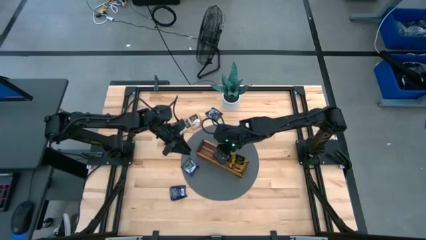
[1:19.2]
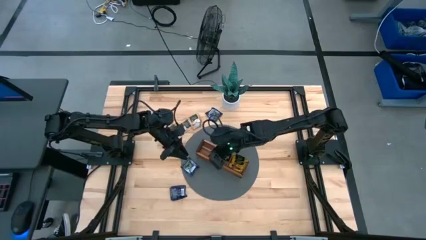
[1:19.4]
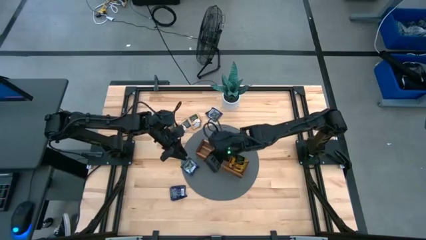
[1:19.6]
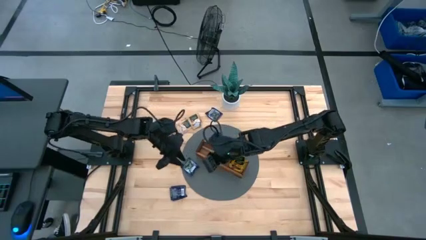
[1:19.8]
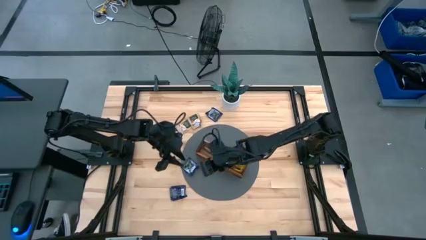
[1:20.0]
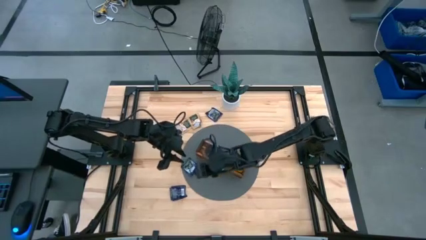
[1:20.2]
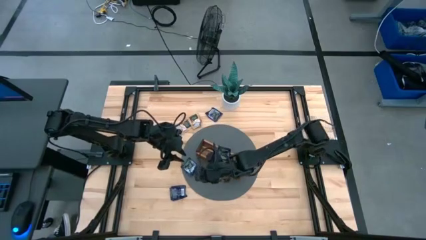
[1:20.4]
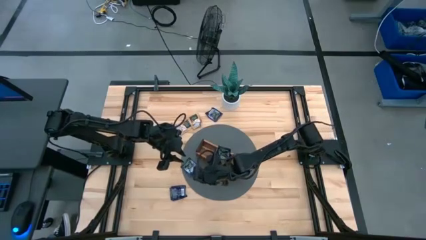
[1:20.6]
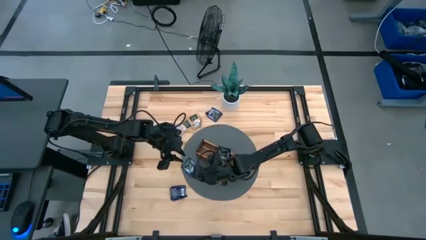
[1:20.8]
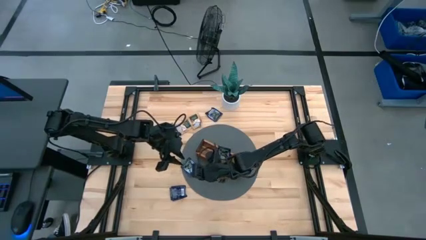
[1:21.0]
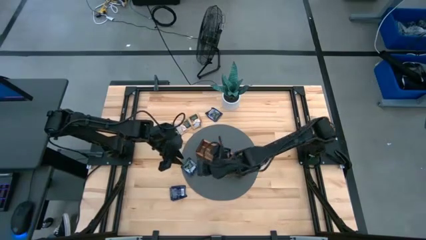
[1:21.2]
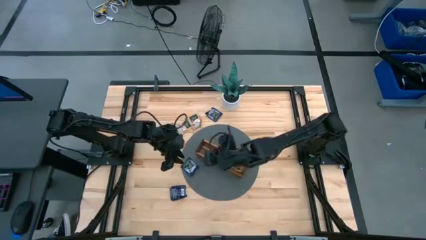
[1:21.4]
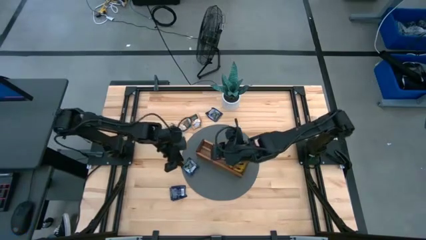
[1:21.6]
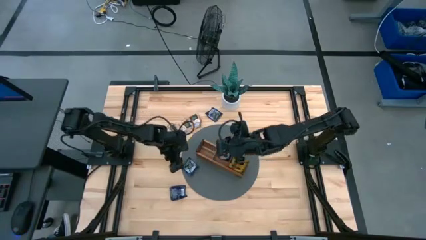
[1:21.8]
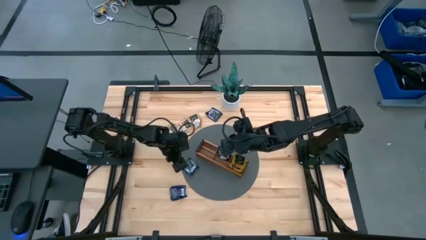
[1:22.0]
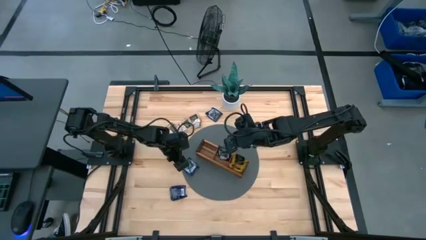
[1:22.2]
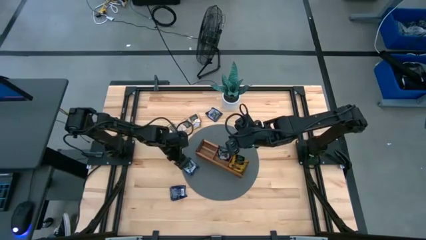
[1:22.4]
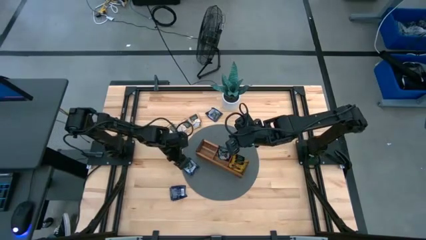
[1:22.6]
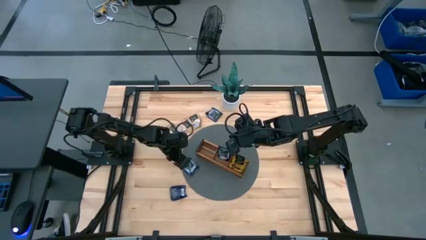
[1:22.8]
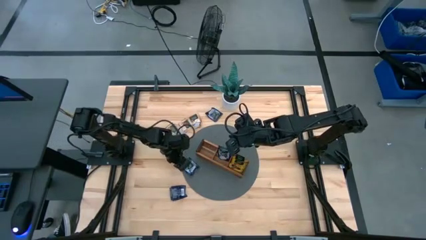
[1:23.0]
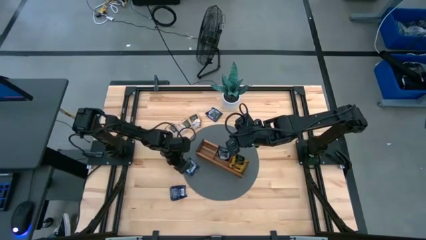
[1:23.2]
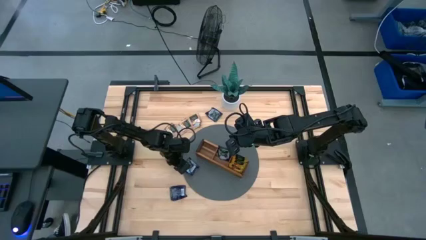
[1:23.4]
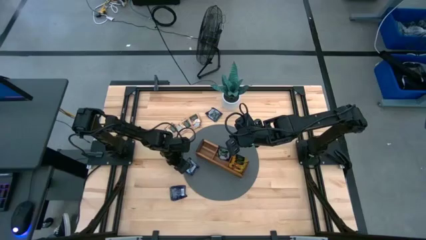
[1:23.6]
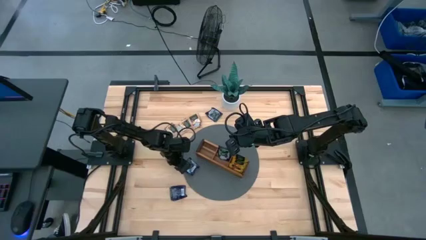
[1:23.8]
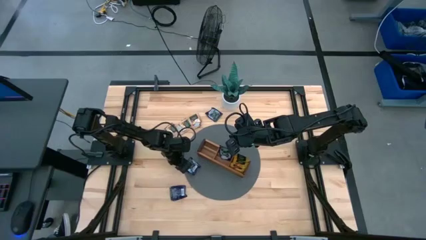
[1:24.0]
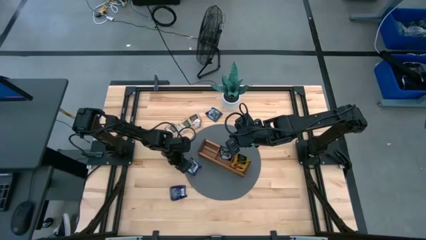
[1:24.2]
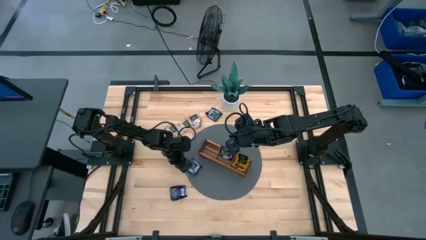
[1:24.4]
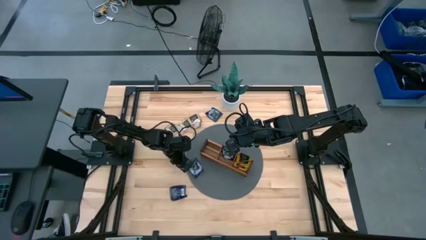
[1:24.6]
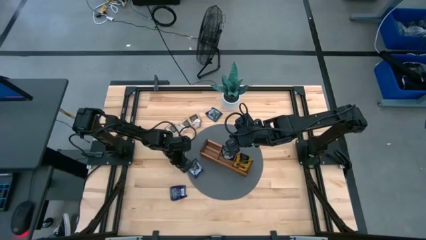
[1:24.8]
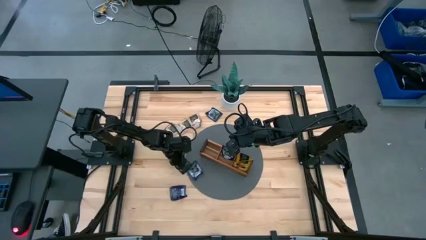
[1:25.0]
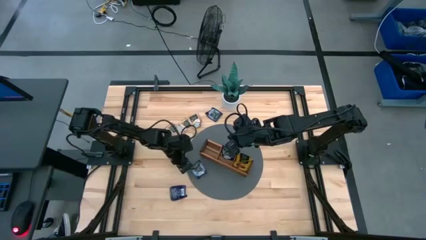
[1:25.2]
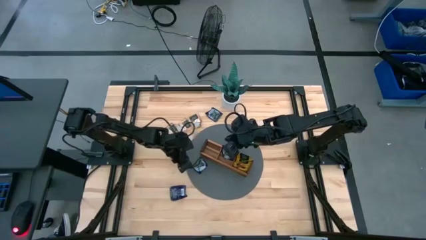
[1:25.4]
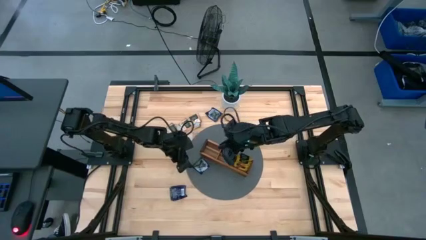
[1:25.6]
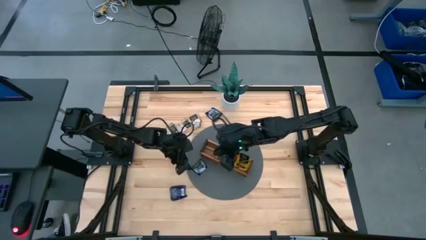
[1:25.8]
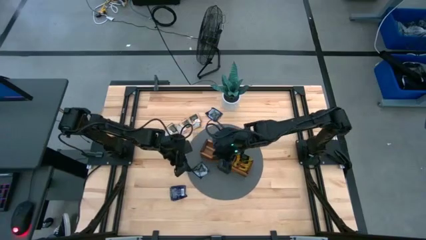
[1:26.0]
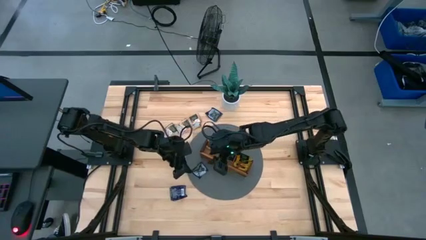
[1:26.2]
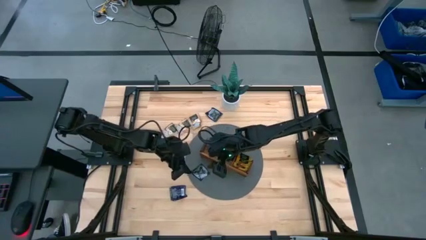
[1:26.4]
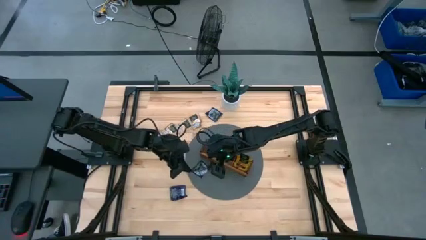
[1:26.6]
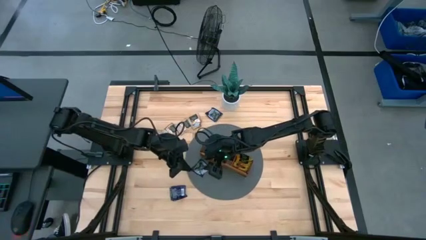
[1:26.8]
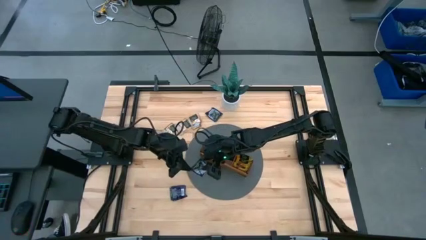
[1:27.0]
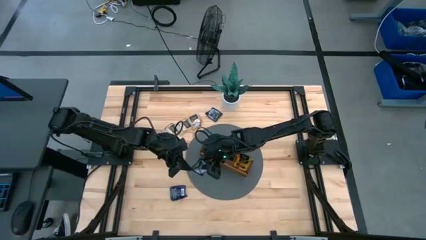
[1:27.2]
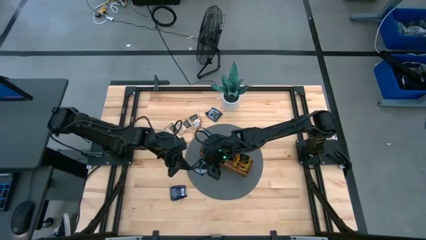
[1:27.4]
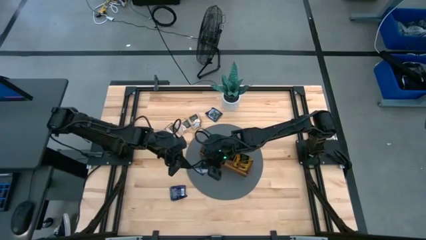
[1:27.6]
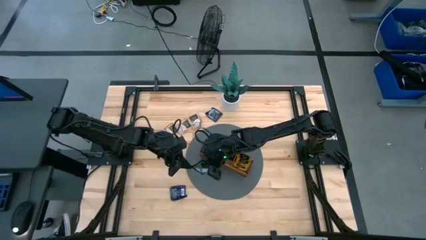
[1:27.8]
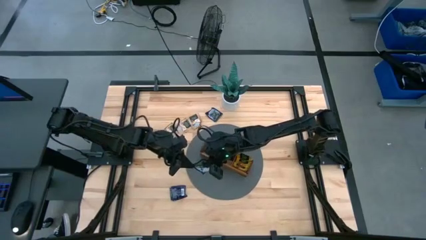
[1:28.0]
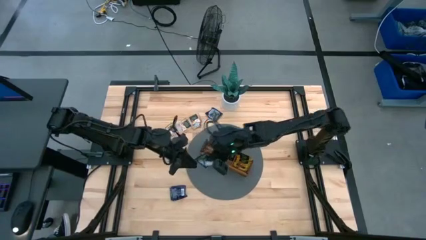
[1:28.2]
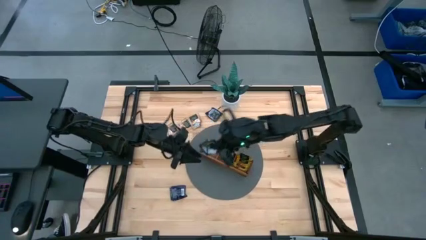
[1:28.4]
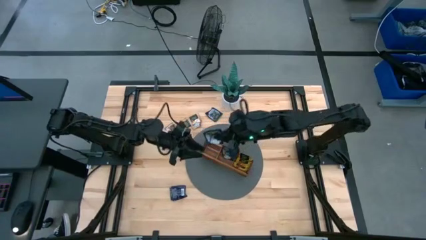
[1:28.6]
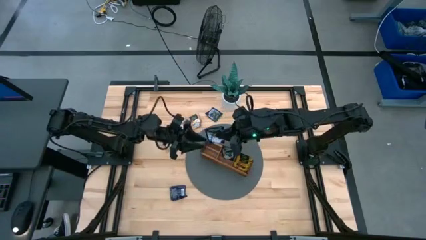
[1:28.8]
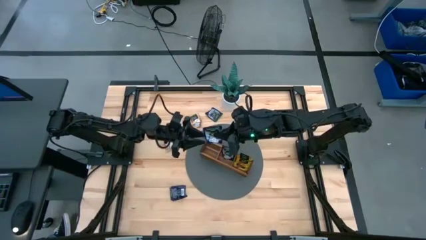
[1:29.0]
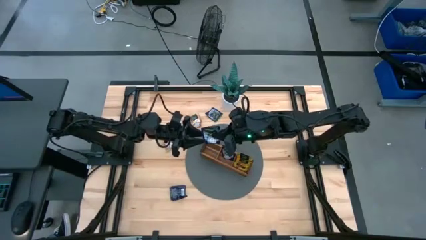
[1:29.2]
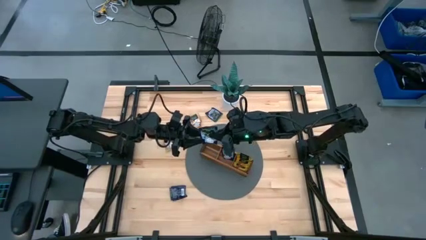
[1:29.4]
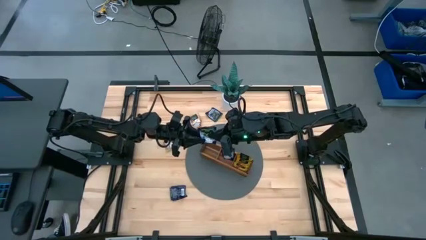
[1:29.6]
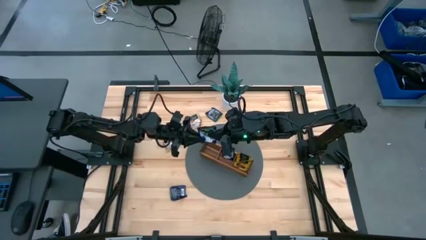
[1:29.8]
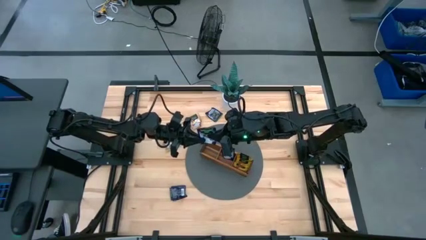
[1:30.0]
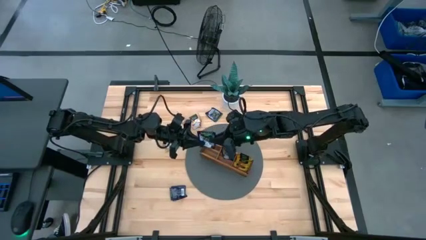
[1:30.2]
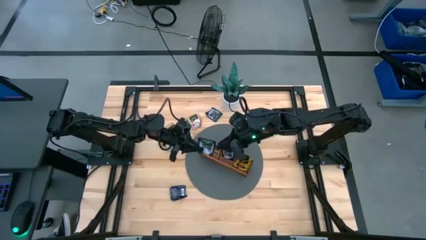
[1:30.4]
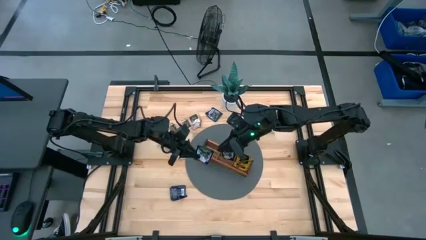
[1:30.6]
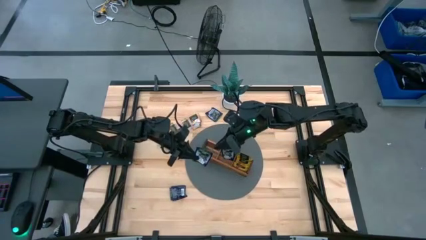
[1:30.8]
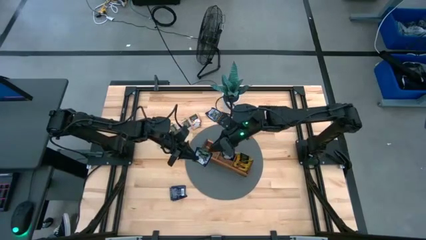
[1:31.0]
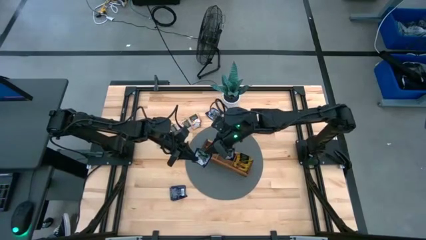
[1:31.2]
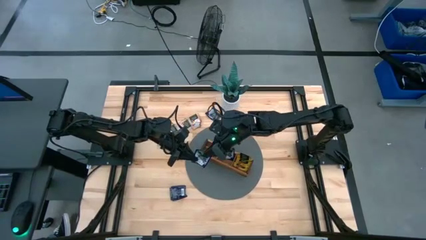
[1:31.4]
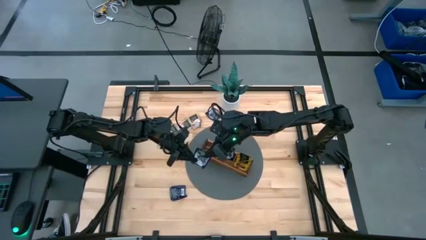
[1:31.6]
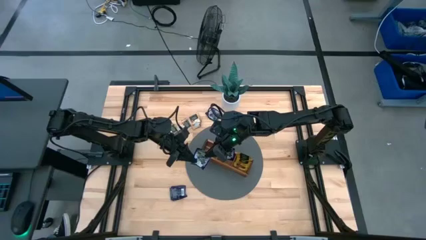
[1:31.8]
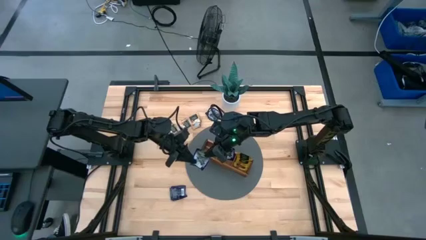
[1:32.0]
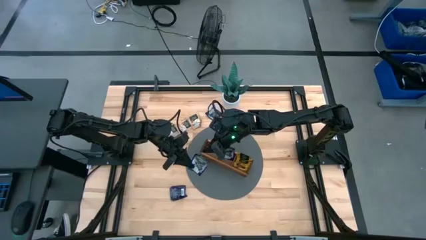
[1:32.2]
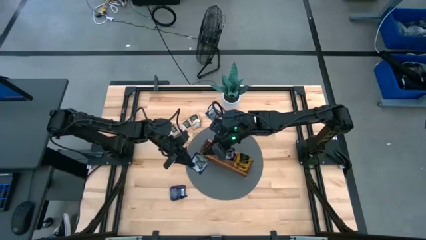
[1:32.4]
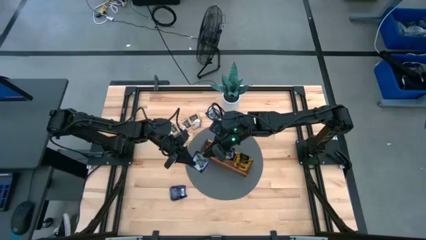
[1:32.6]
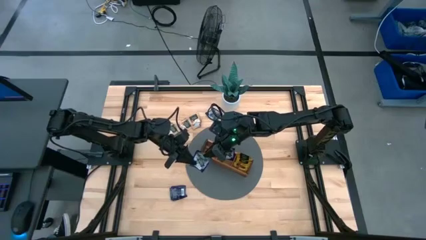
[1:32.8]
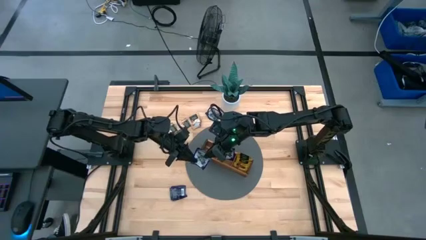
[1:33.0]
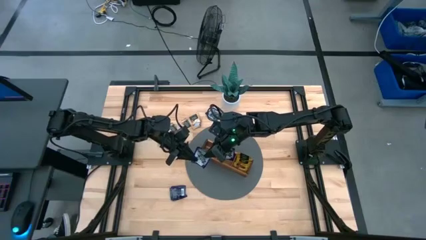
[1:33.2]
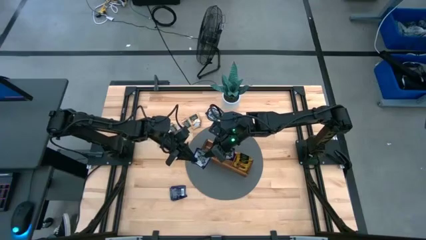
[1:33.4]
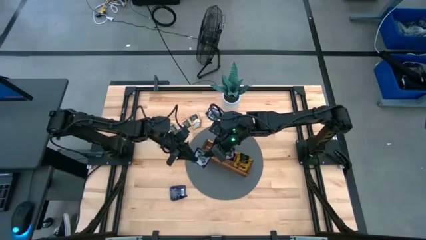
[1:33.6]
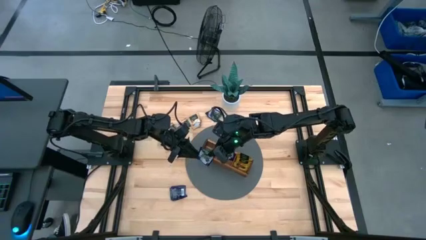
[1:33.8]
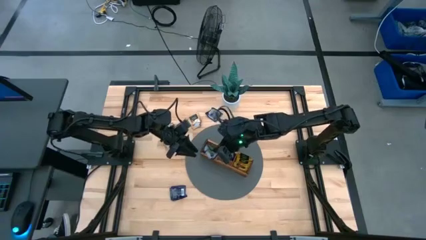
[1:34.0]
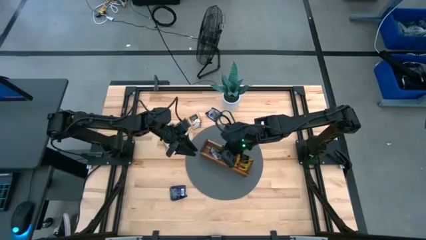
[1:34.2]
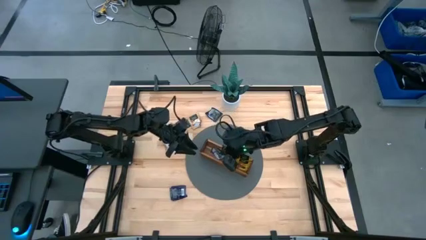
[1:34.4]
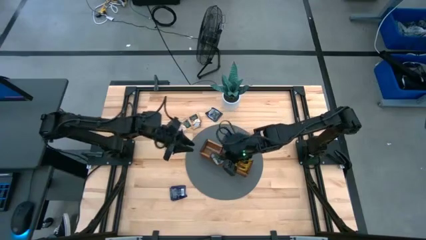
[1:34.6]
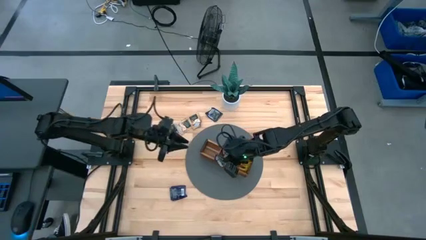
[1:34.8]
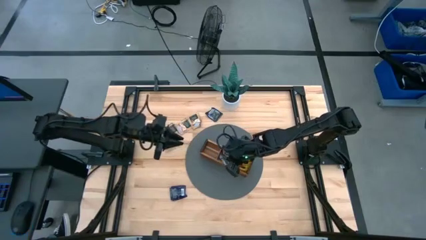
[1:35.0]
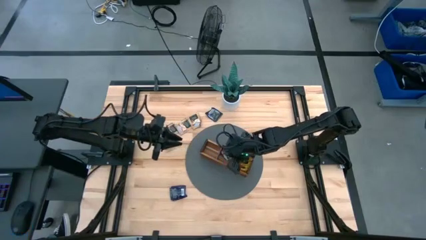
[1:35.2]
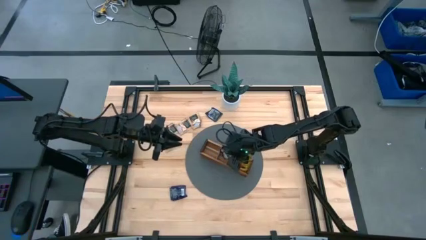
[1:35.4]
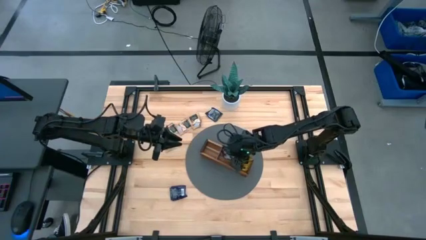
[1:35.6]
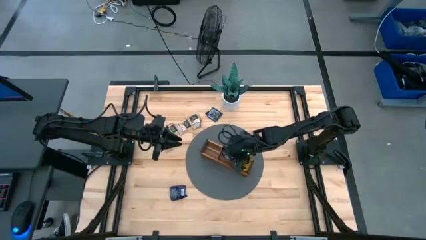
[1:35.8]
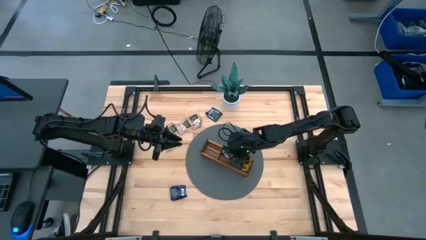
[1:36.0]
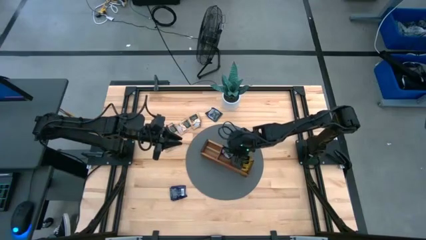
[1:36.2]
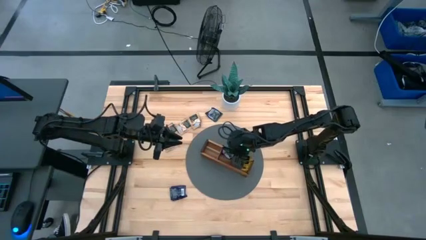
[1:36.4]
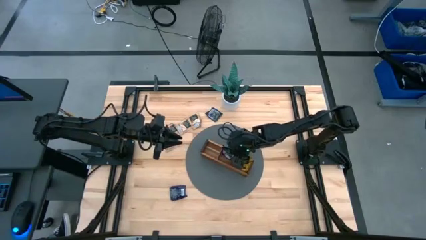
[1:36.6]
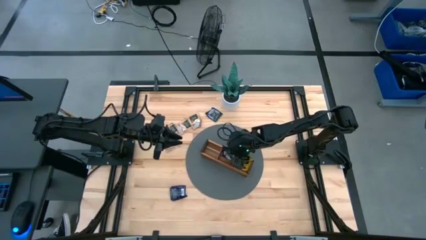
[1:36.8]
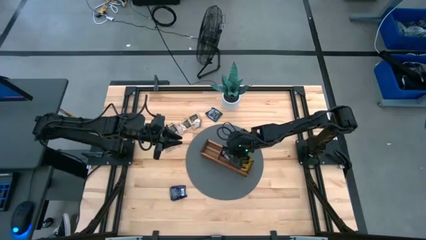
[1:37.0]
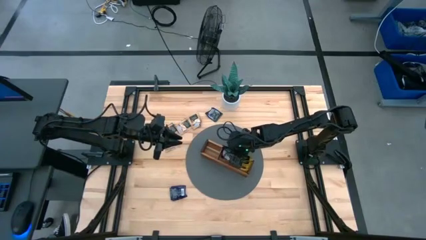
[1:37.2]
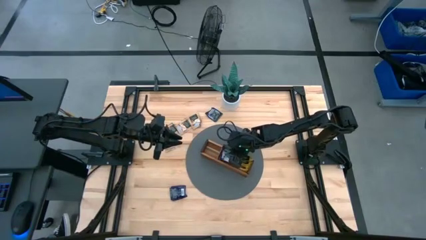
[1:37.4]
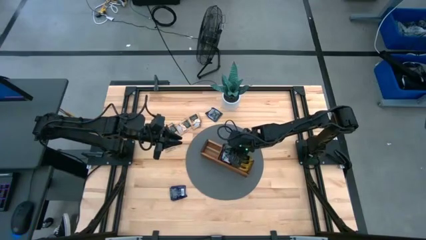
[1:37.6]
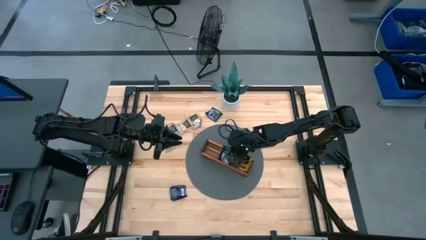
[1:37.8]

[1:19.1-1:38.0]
Task: Pick & Place Tea
Put the violet tea bag into the middle section of the wooden organizer
